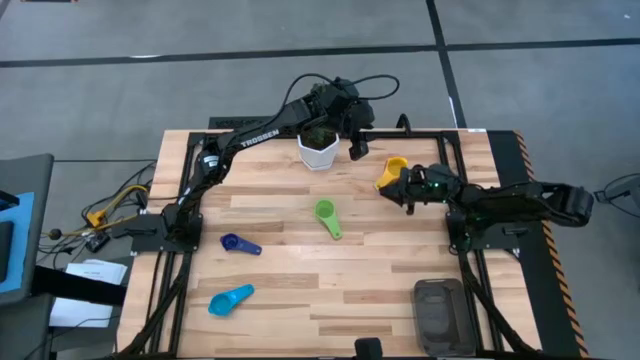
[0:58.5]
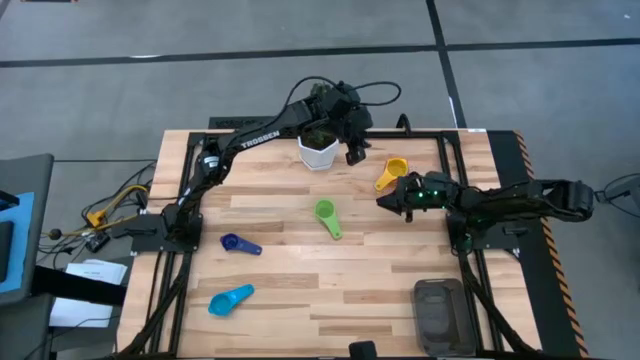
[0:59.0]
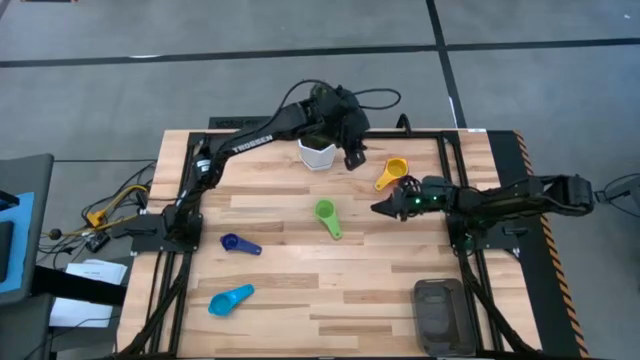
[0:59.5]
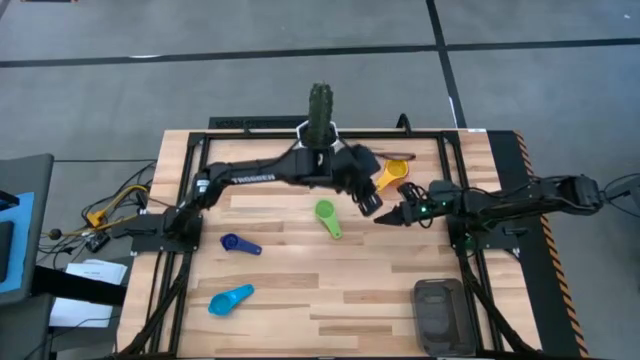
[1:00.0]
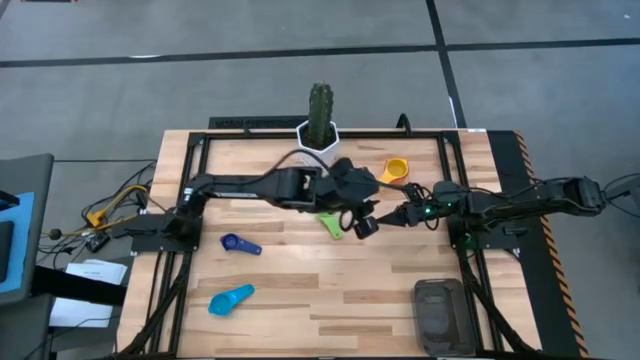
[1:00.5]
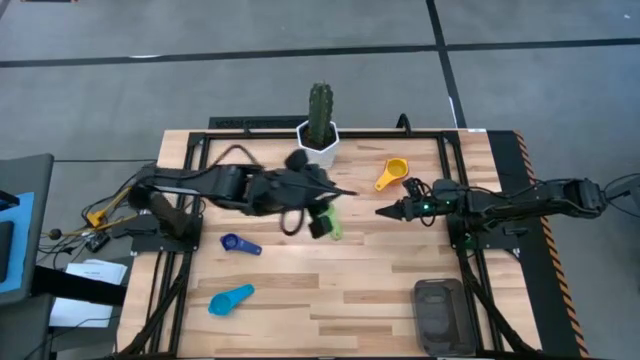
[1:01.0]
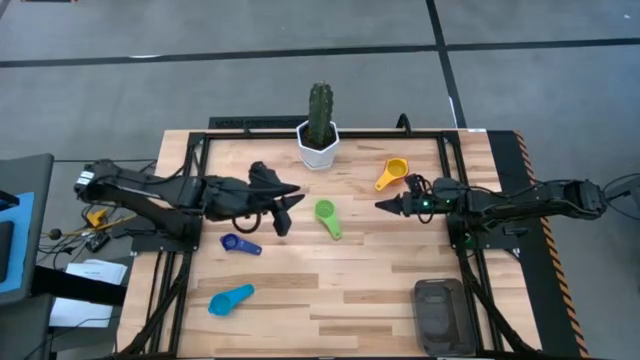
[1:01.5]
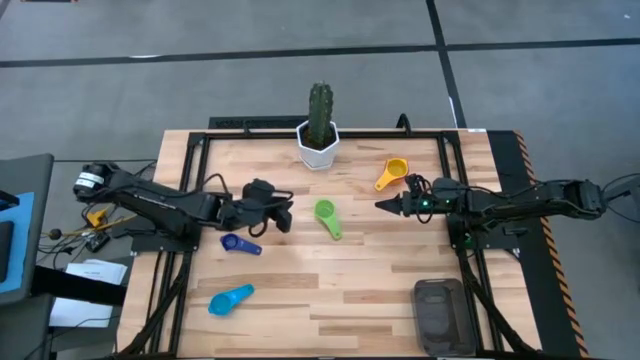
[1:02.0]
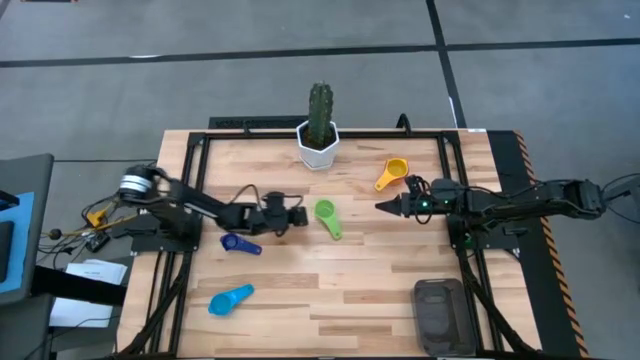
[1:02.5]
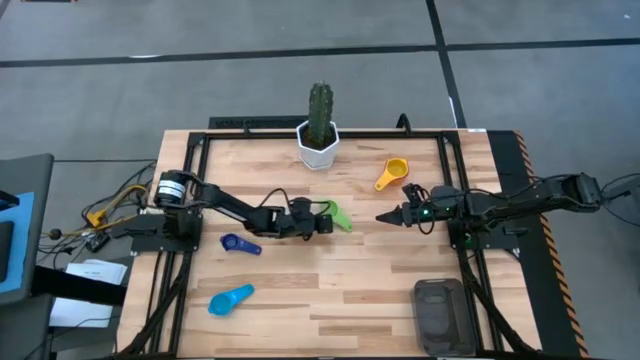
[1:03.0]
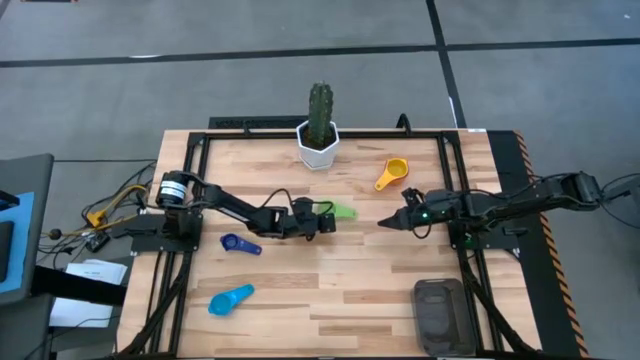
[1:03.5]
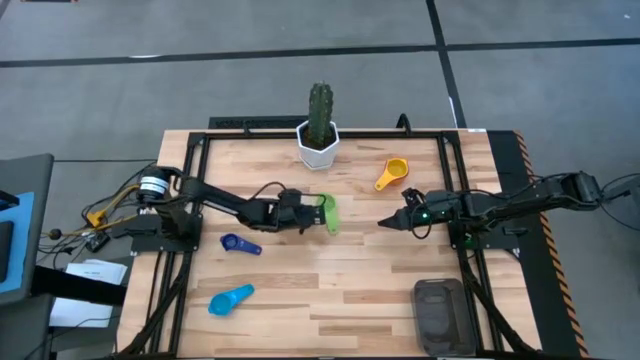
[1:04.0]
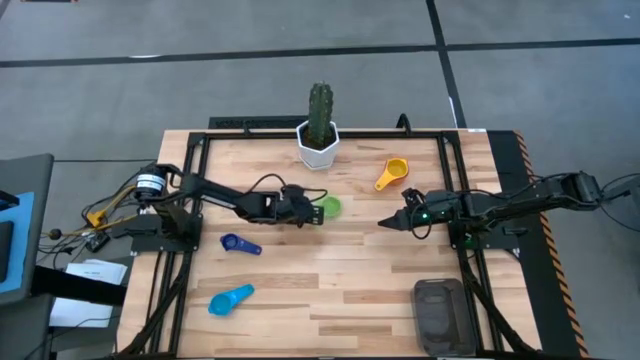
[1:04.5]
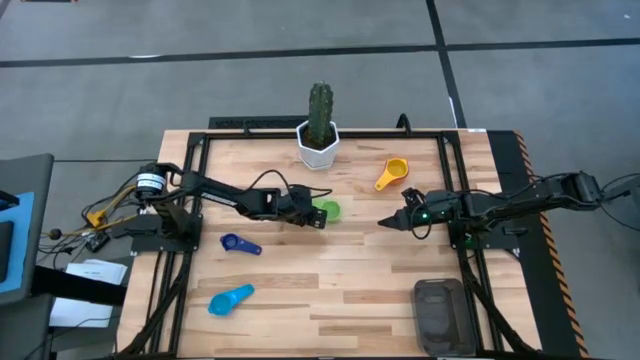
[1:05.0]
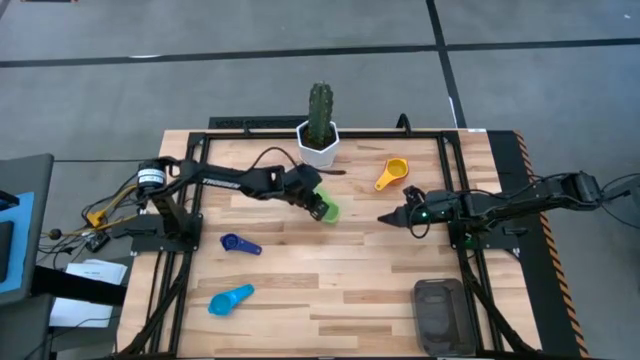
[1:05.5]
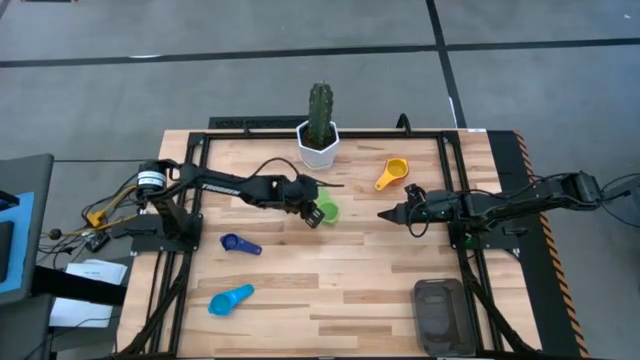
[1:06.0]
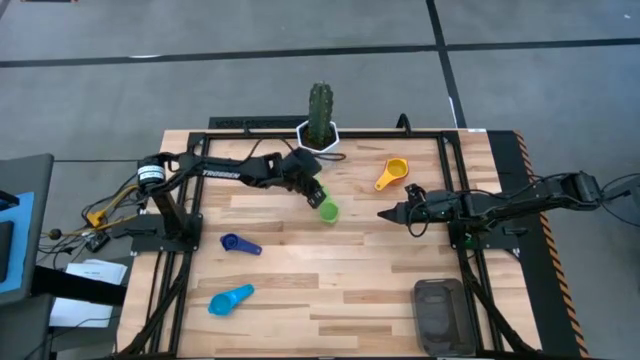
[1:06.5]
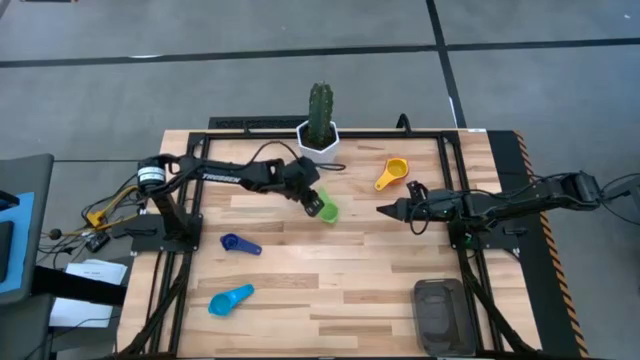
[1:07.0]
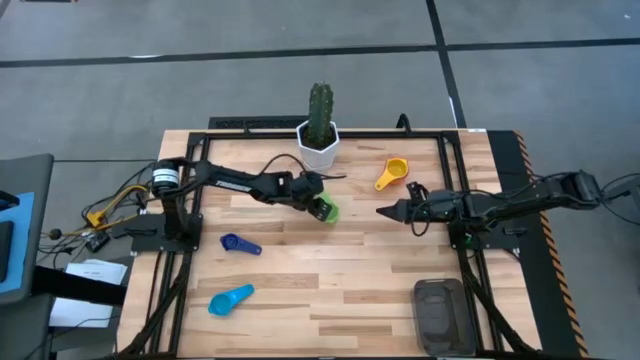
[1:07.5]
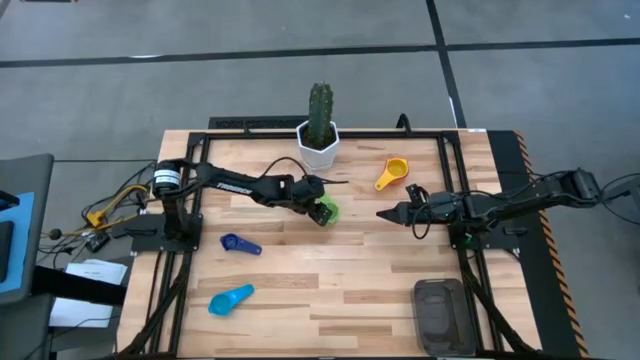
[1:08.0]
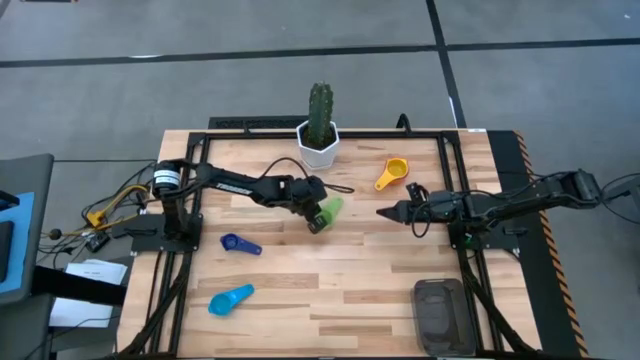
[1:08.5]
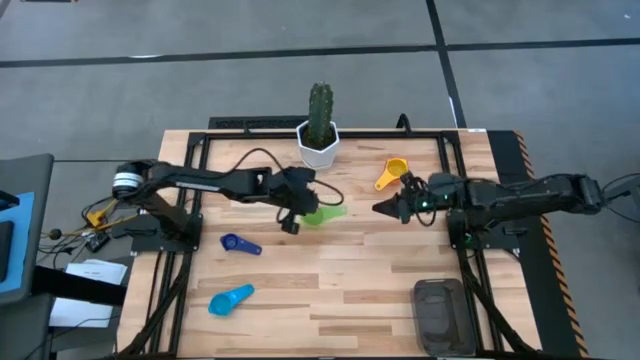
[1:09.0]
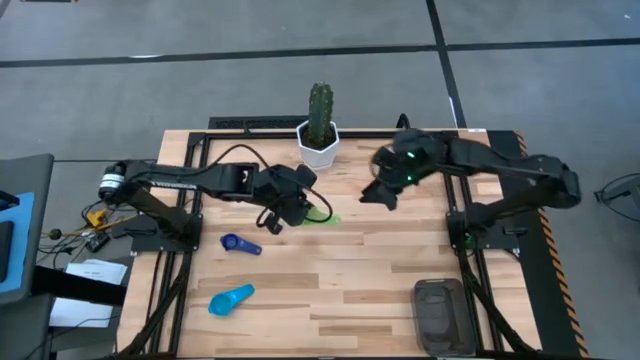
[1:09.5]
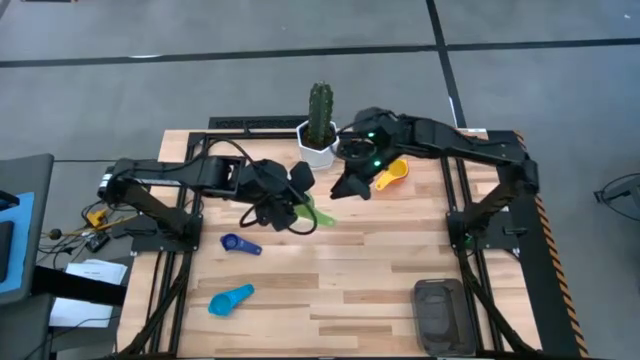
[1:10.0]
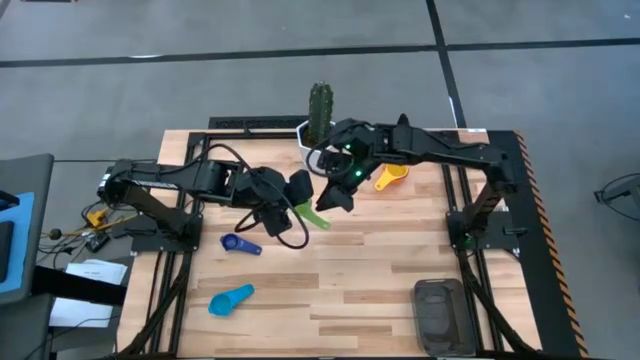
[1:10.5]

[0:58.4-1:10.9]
Task: Nest measuring cups in basket
Stack the green measuring cup on top of the yellow measuring cup

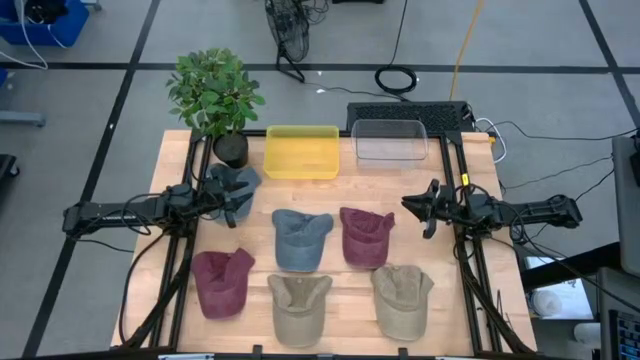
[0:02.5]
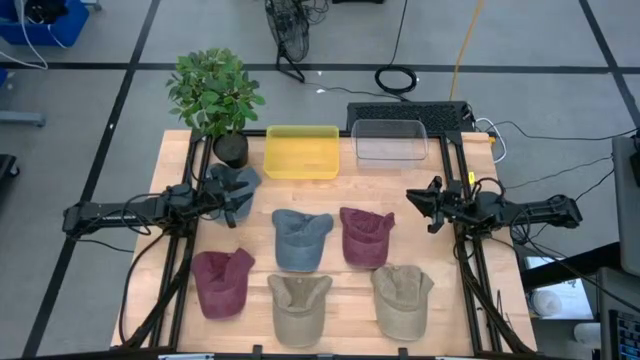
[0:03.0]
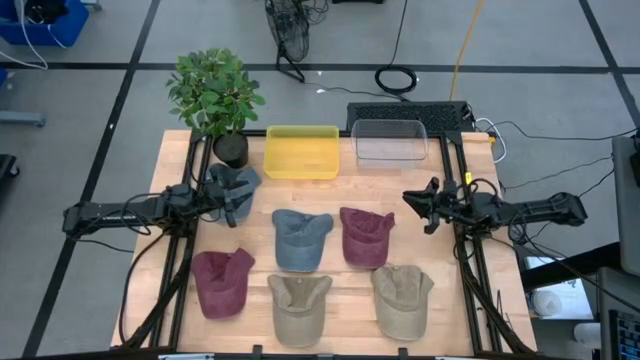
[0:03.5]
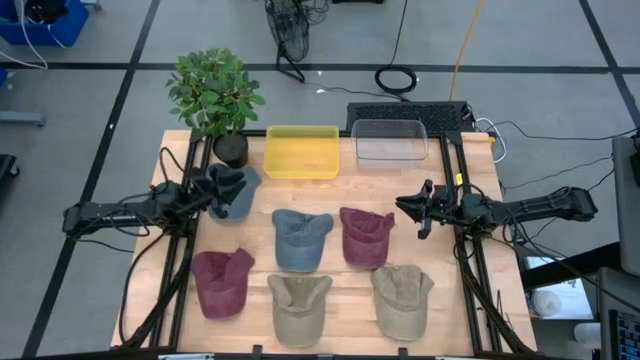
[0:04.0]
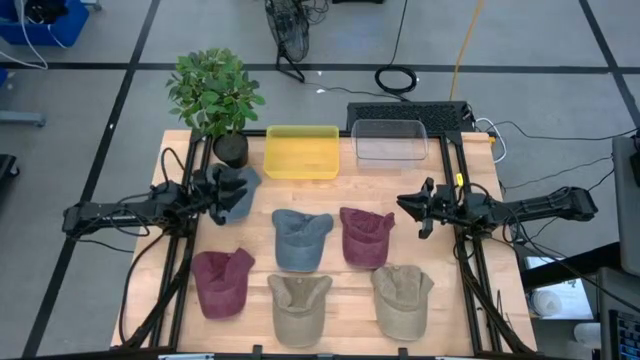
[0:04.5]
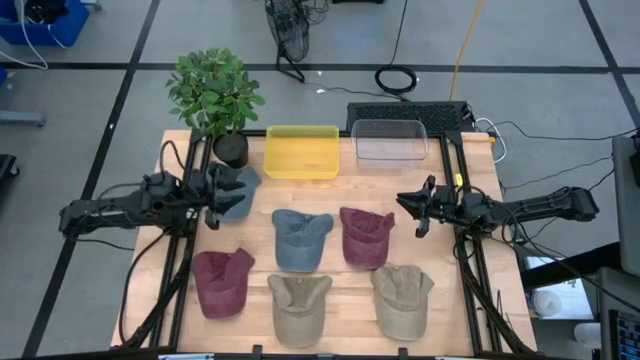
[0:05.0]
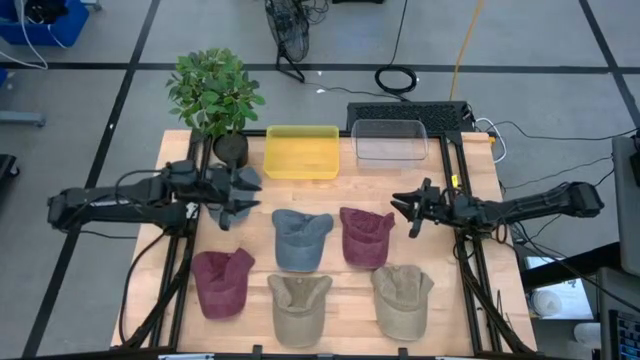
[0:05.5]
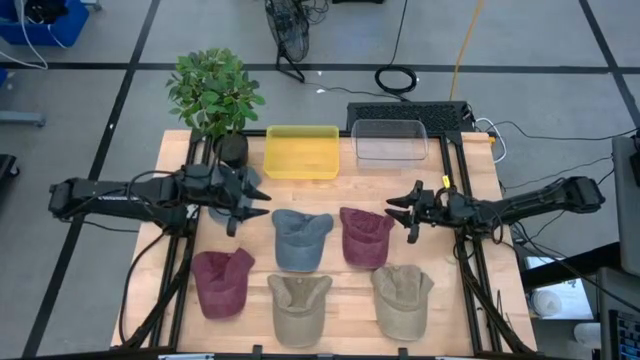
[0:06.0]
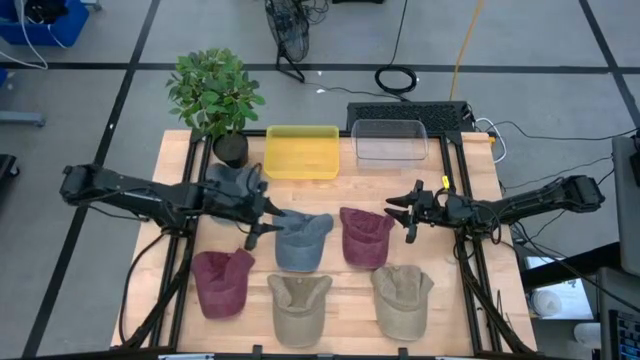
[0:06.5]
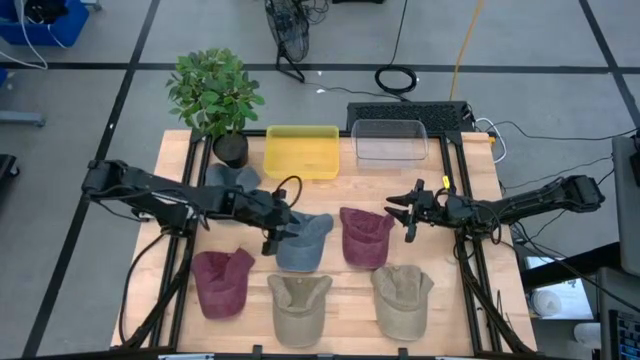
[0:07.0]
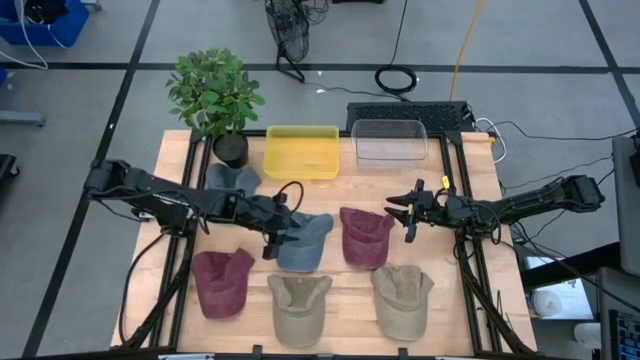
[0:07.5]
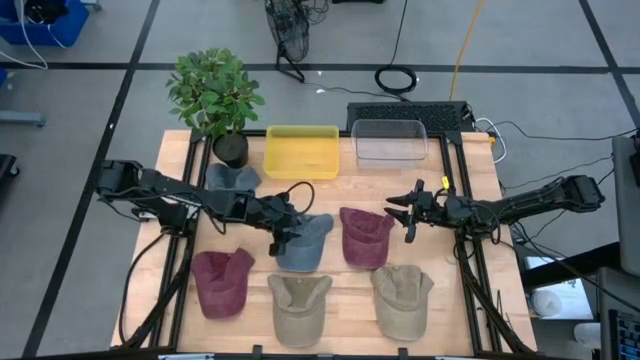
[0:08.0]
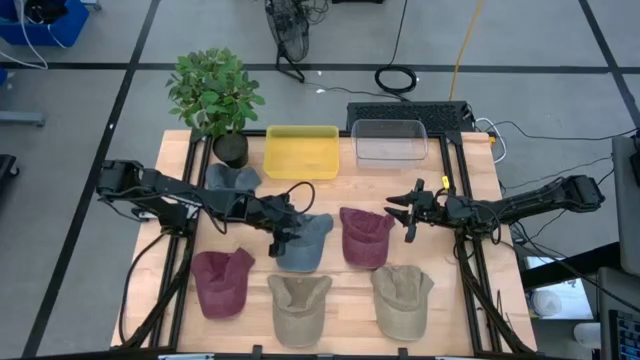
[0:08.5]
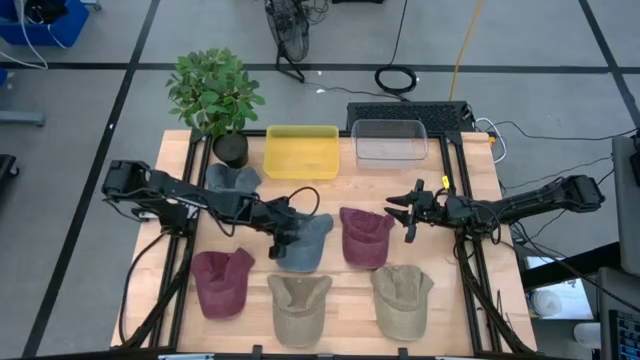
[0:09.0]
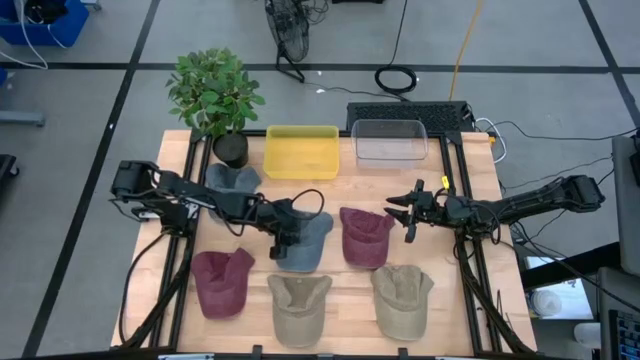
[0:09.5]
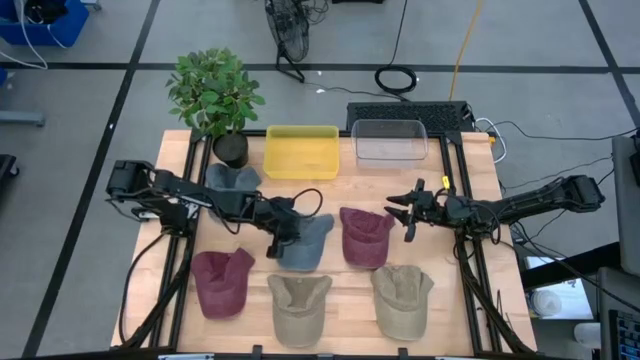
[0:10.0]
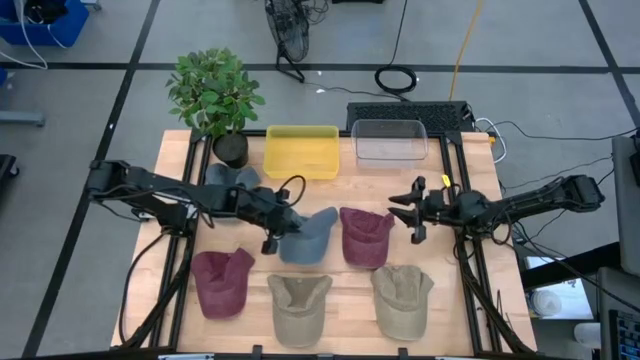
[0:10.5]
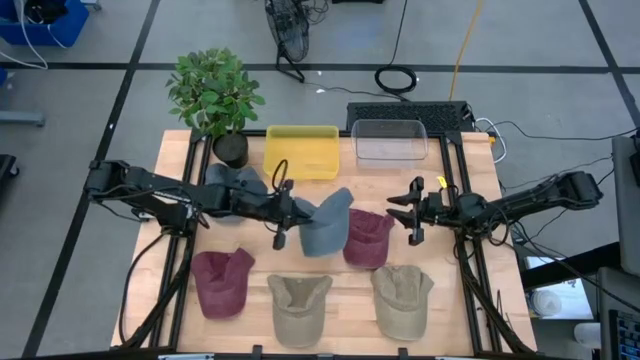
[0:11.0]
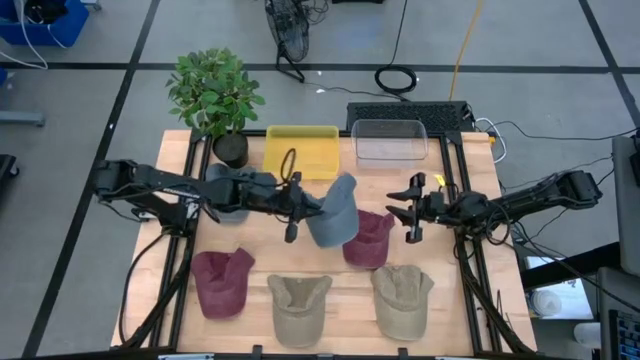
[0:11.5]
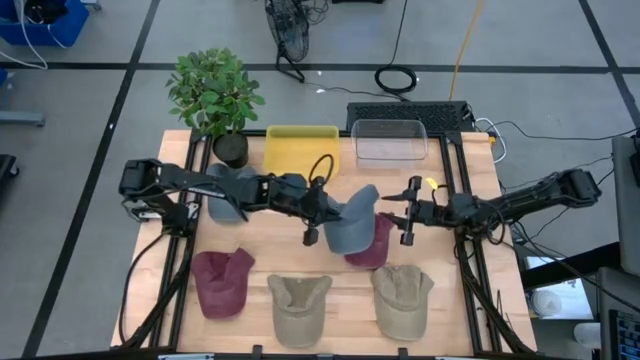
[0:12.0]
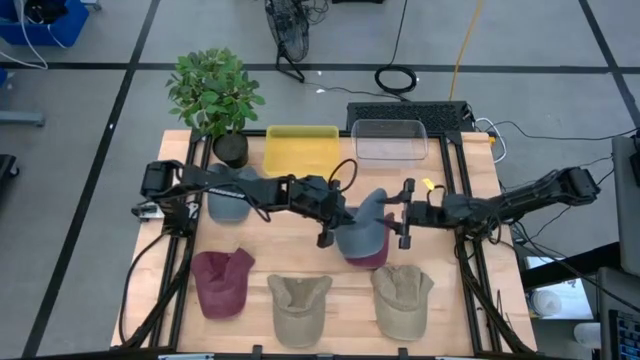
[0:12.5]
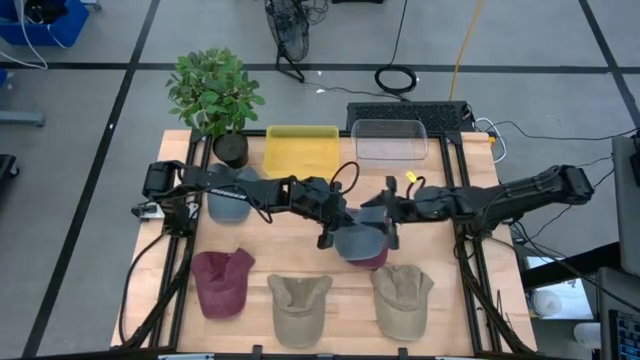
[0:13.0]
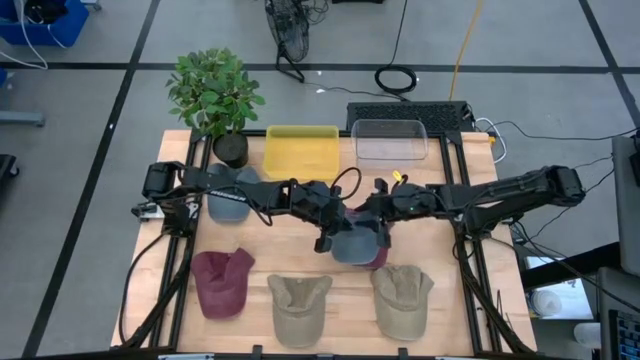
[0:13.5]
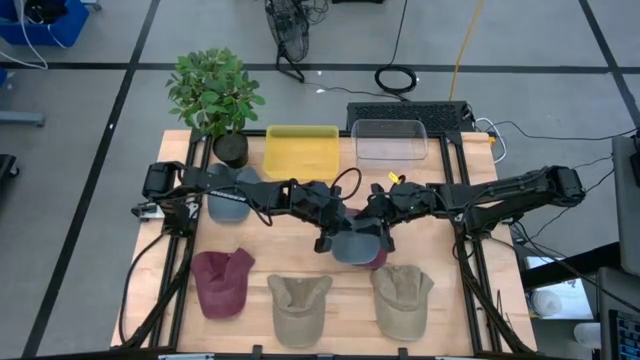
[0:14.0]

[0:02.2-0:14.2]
Task: Pick & Place hat
Put the right blue cap into the transparent bin
